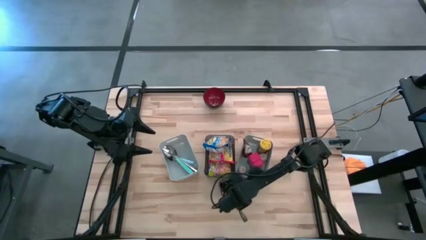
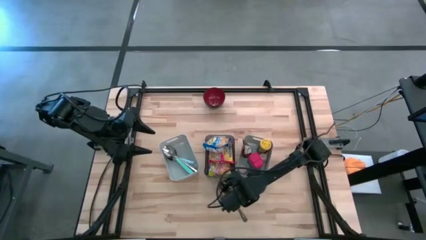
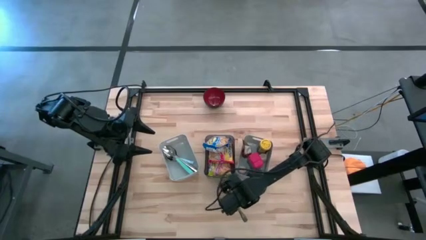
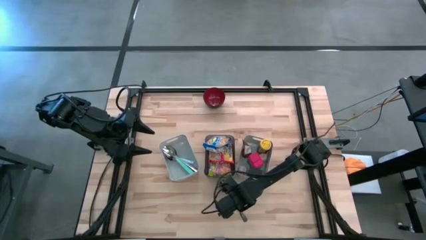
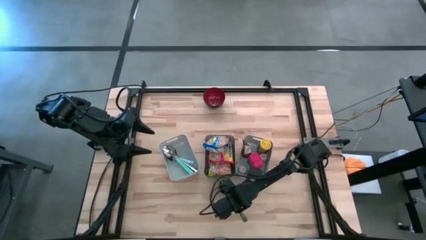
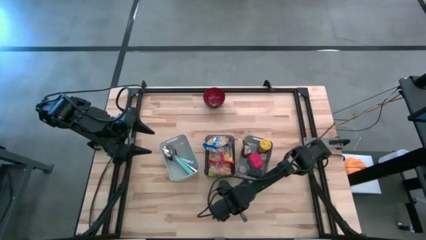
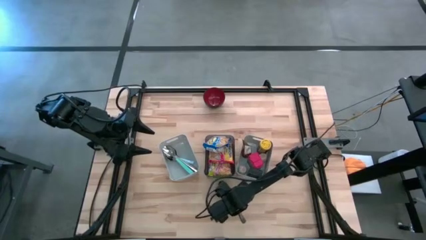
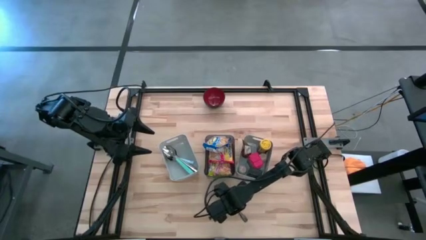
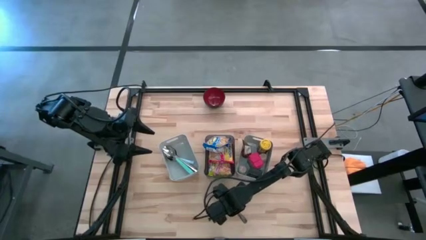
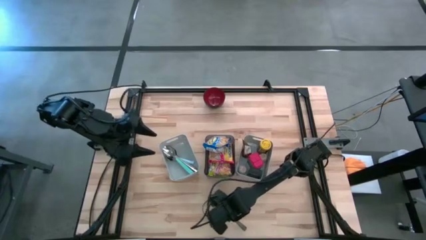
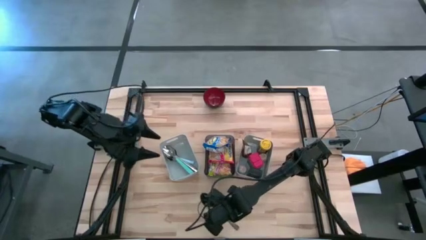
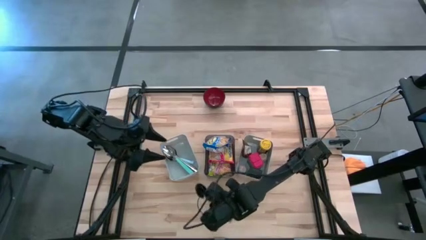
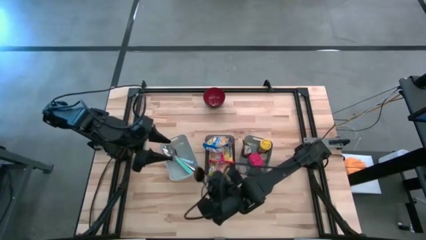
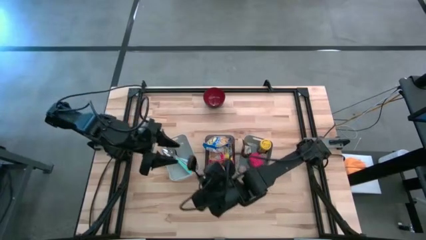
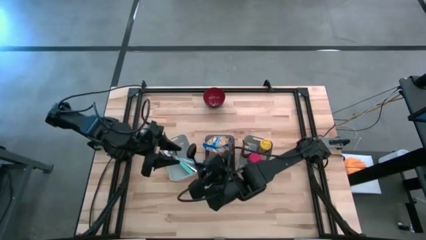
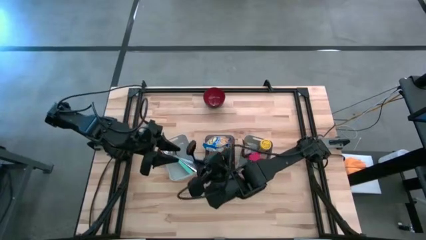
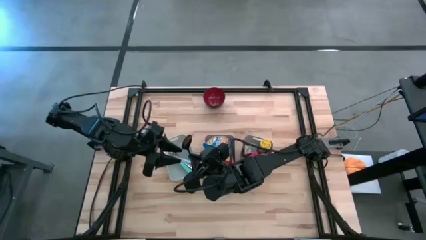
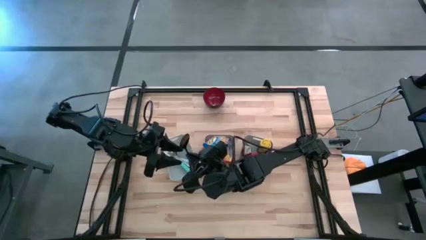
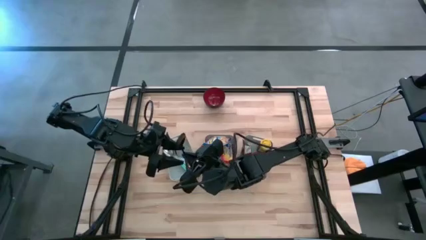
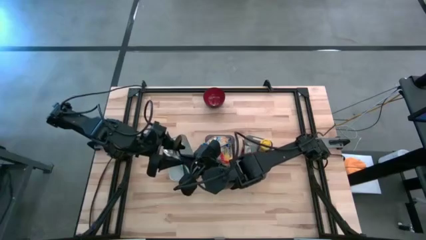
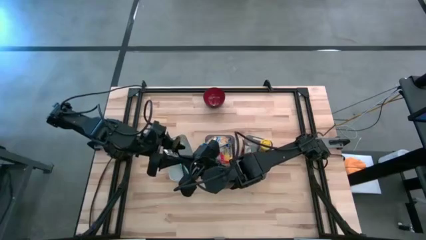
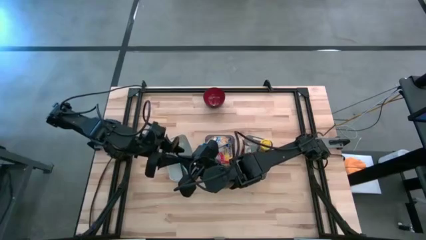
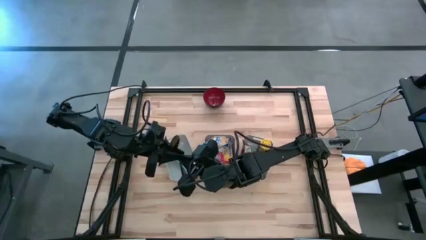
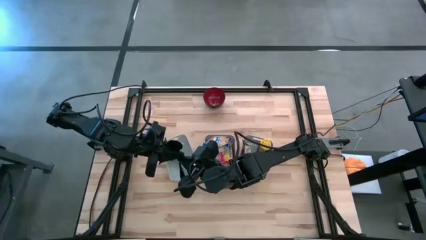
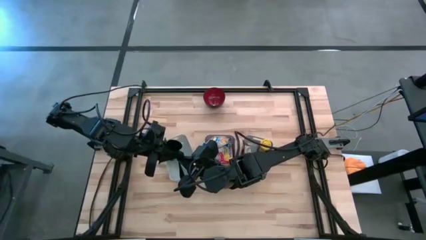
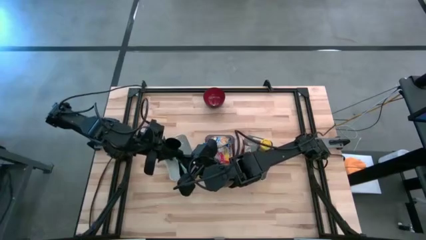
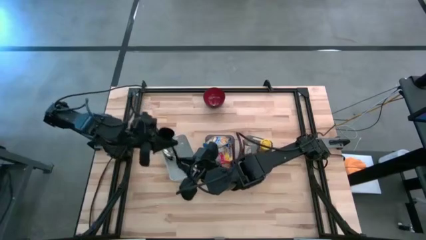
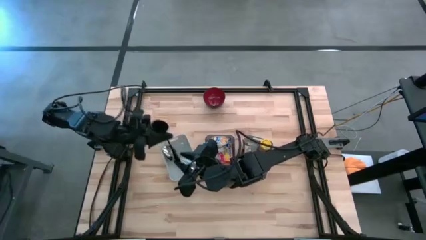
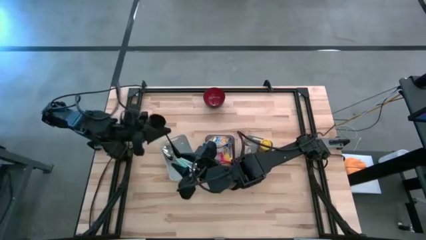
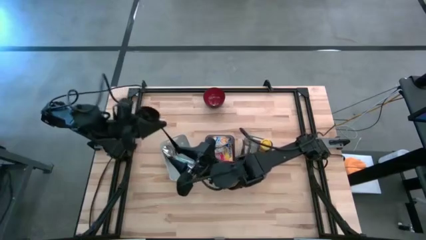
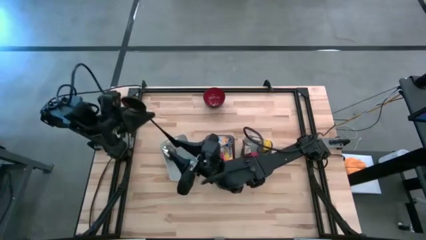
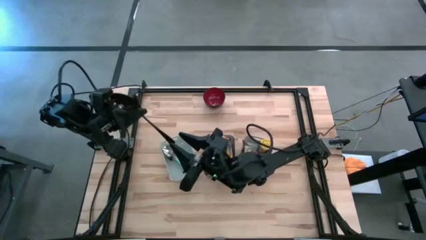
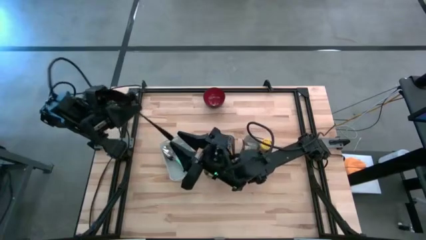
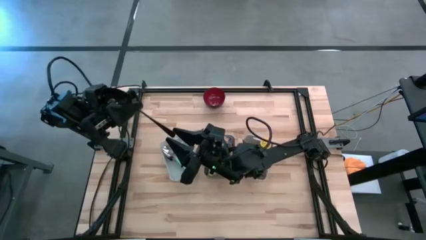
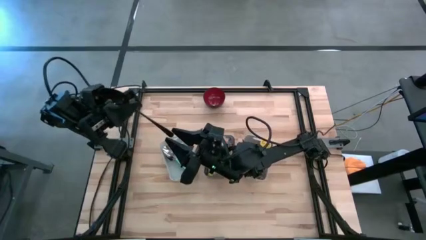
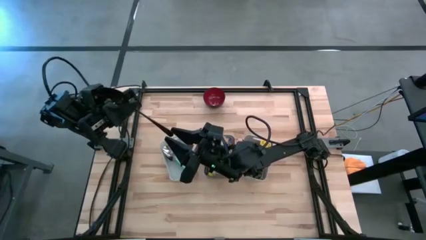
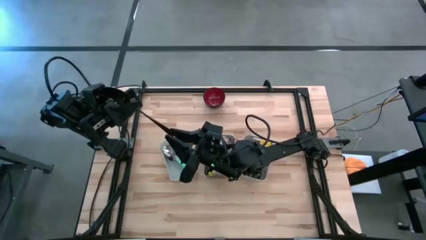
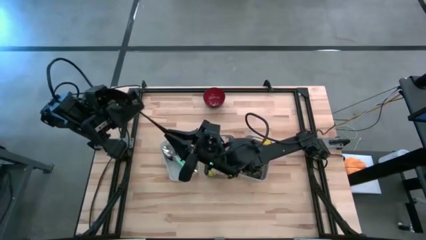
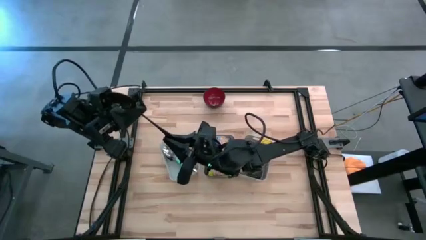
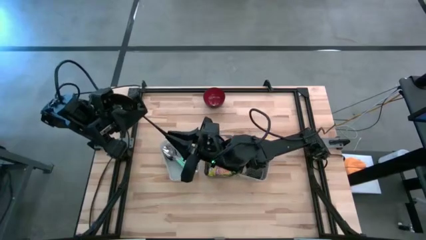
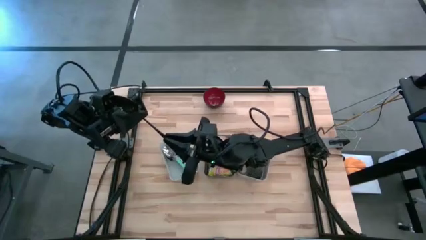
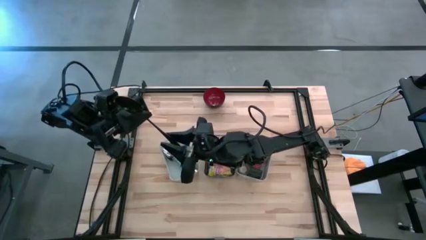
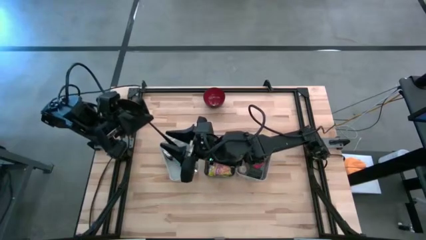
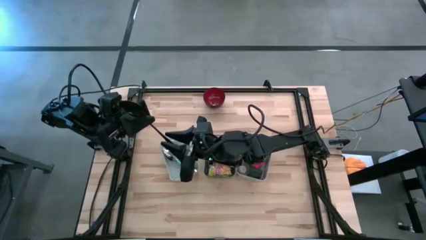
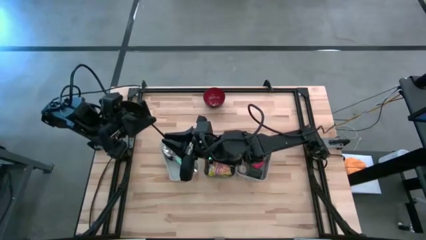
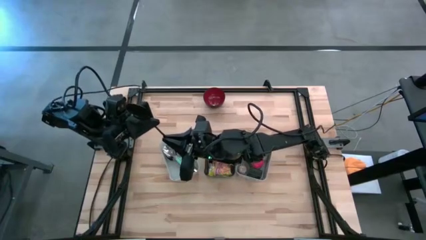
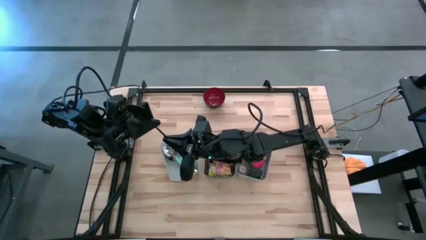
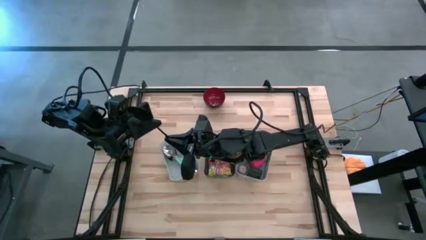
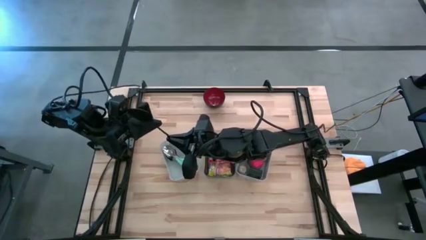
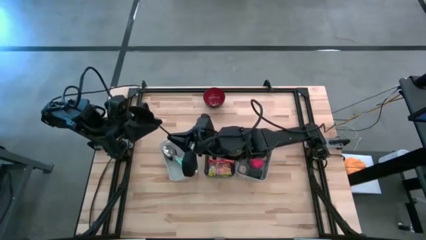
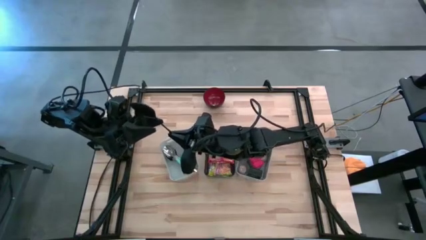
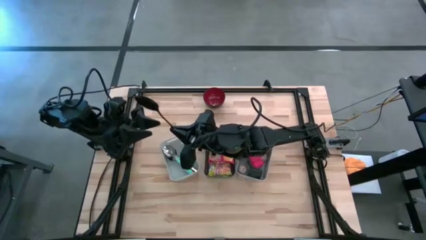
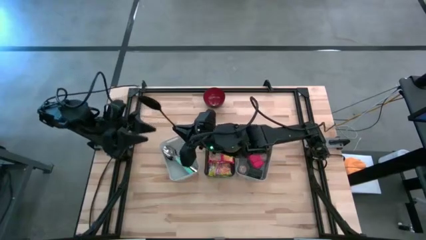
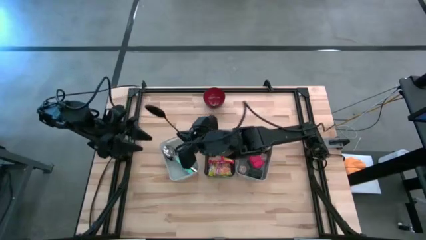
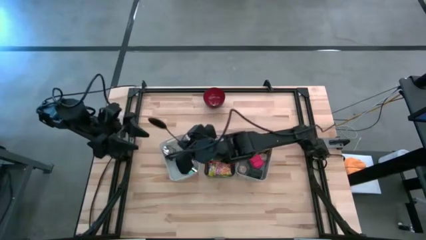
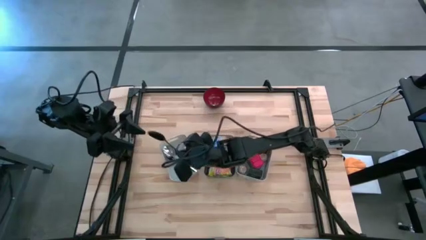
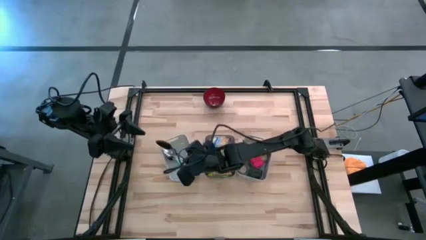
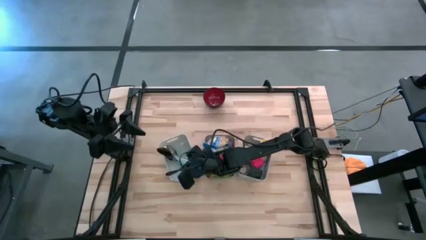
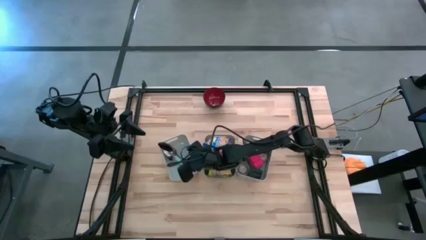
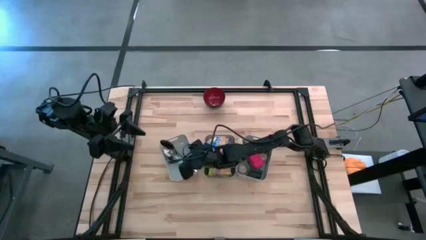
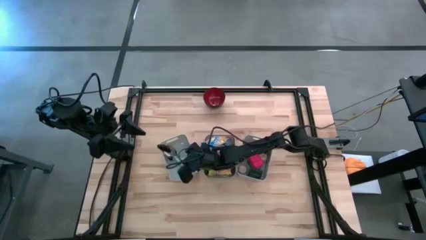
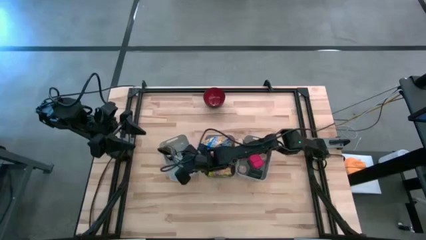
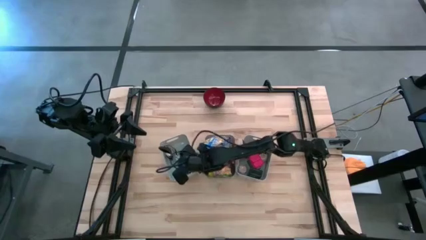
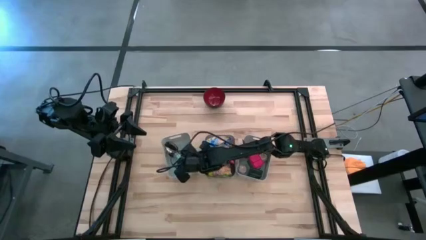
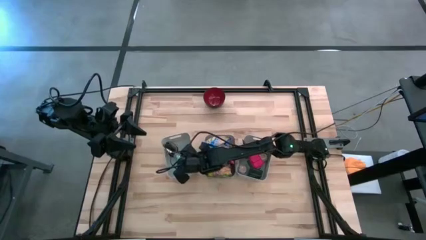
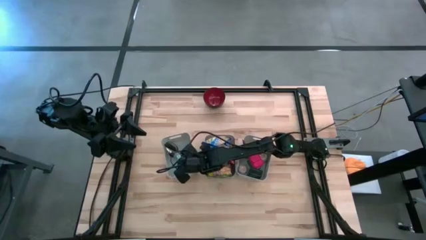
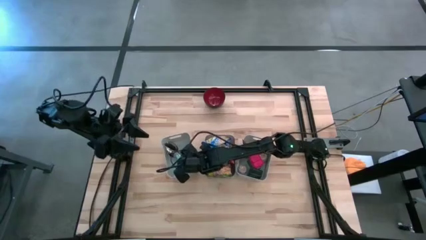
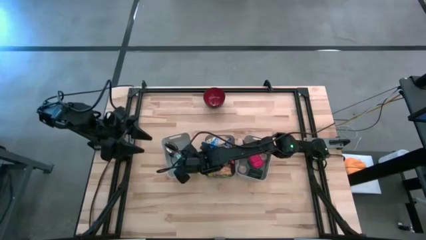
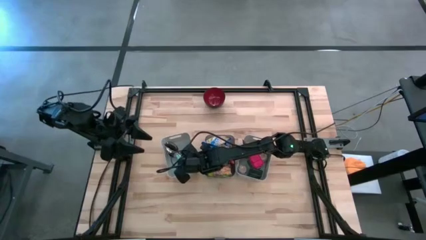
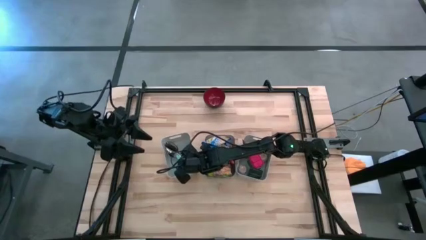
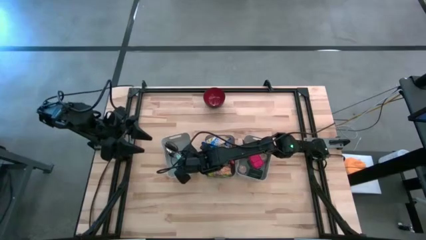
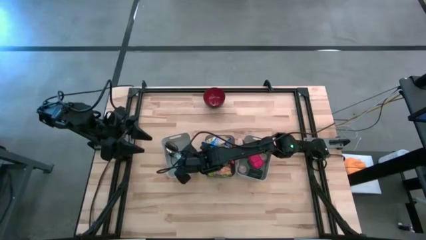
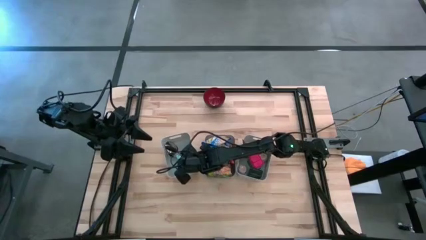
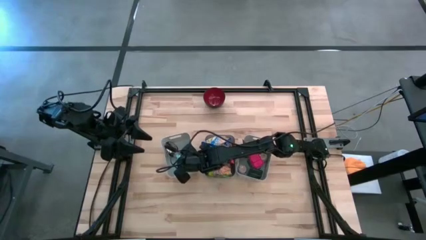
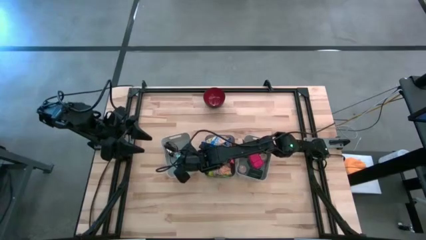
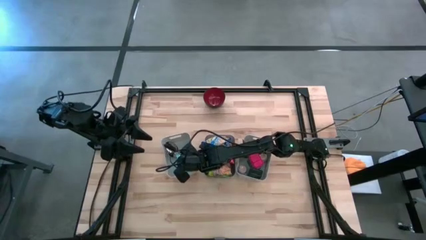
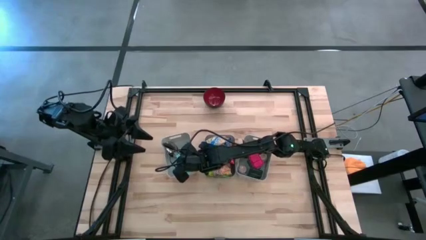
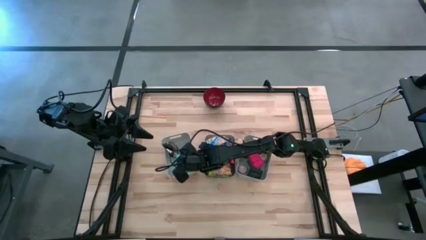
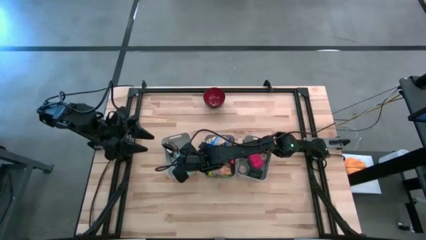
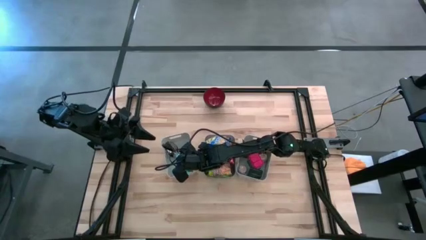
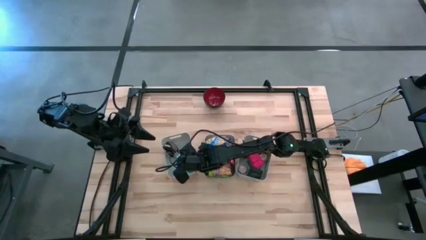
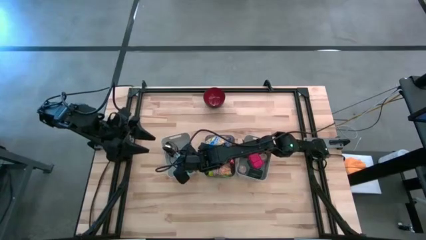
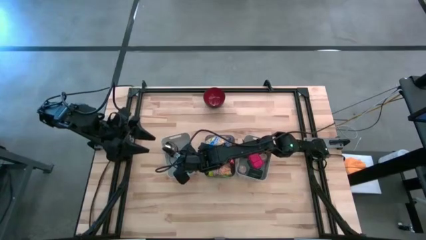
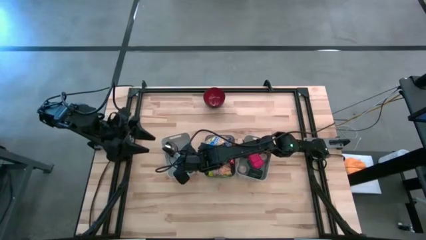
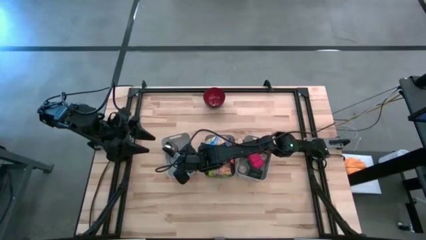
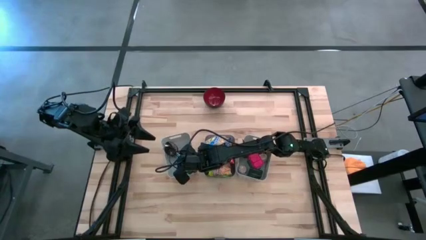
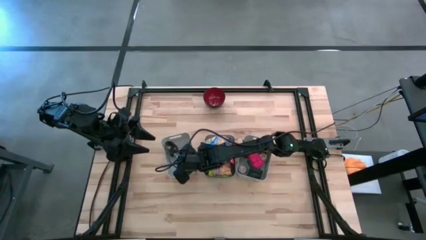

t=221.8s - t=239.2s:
Put the black spoon into the left gray bin
